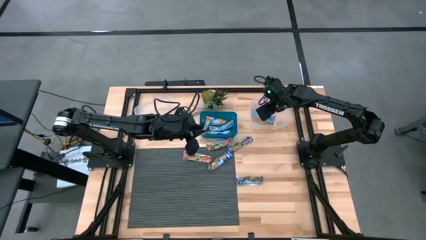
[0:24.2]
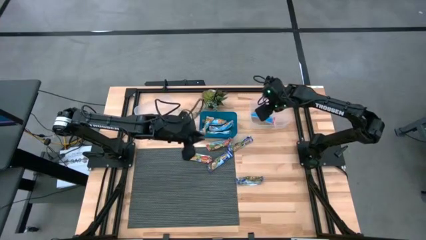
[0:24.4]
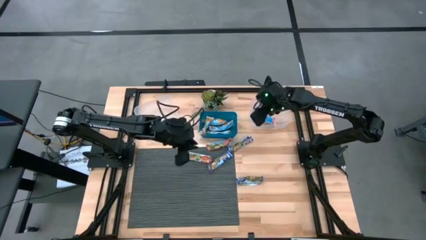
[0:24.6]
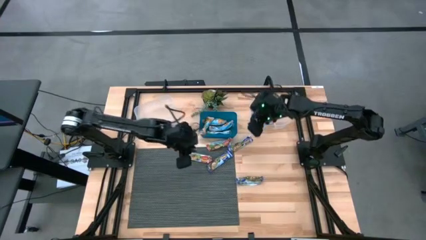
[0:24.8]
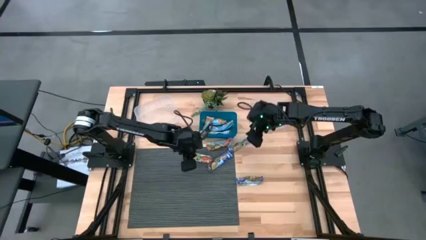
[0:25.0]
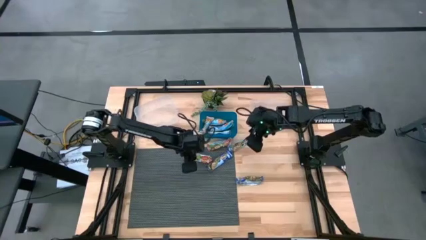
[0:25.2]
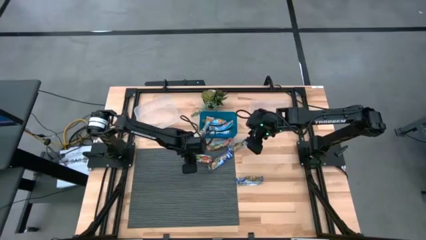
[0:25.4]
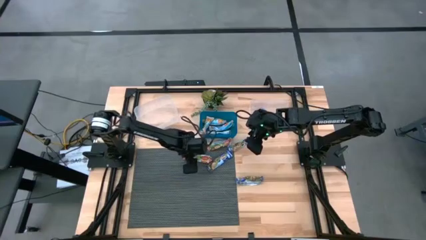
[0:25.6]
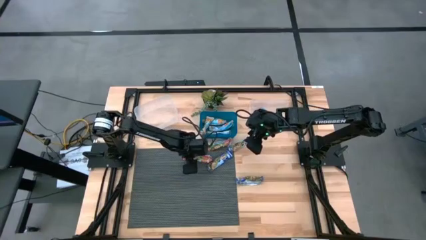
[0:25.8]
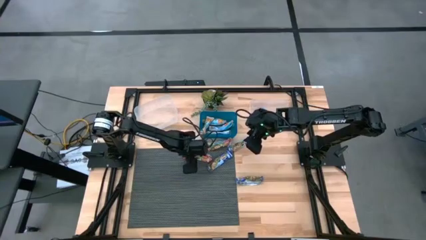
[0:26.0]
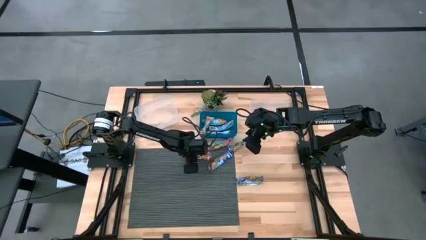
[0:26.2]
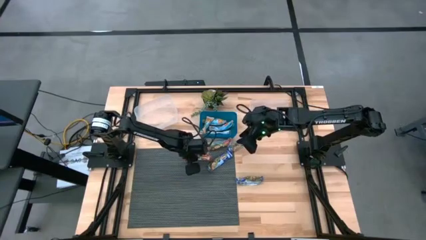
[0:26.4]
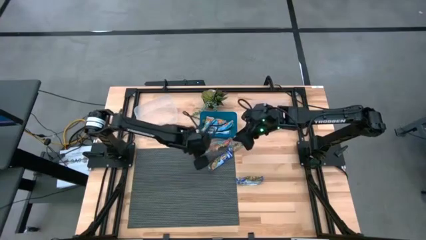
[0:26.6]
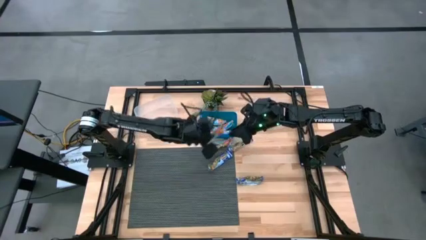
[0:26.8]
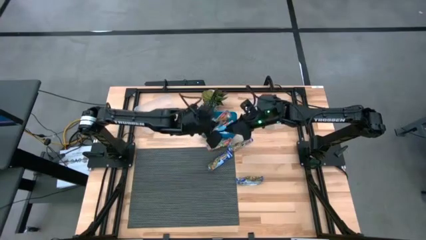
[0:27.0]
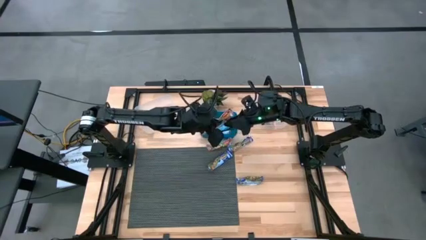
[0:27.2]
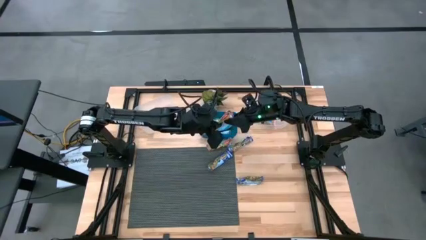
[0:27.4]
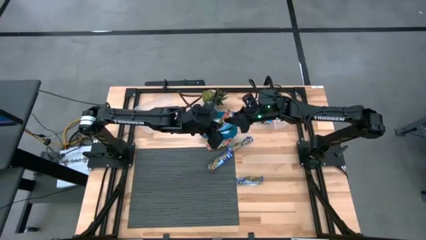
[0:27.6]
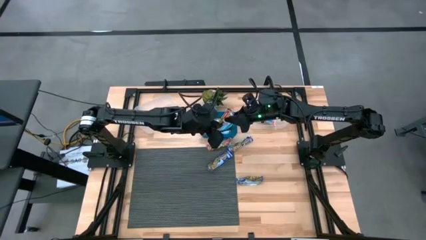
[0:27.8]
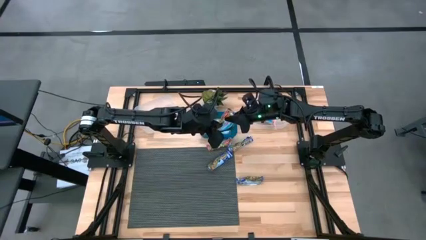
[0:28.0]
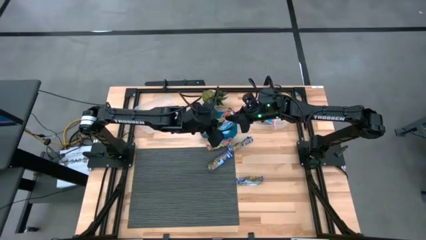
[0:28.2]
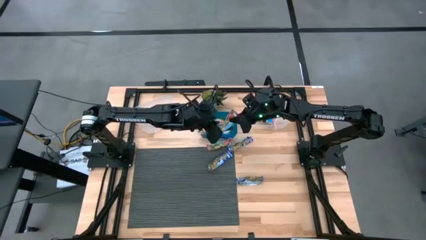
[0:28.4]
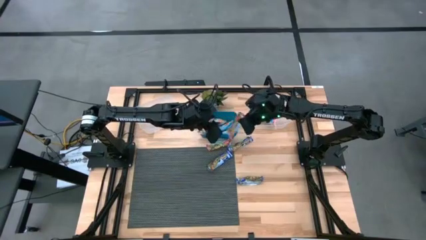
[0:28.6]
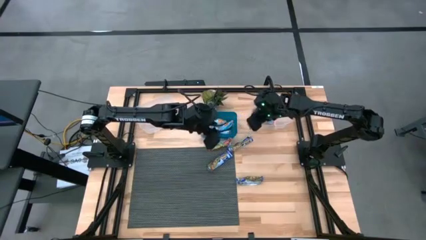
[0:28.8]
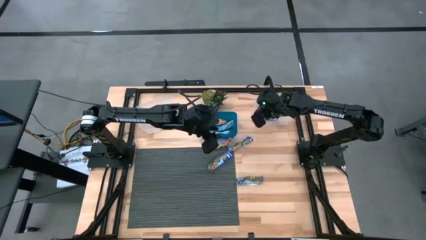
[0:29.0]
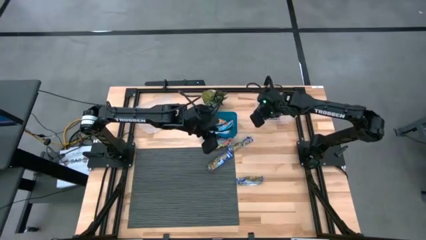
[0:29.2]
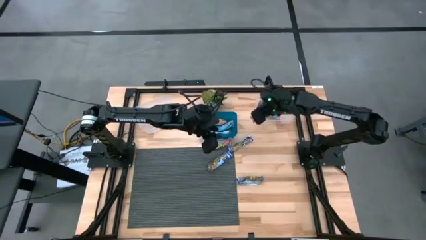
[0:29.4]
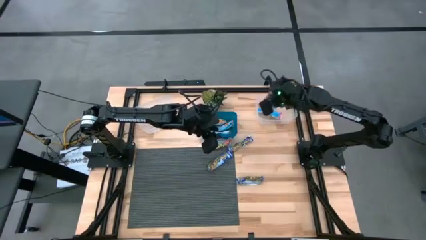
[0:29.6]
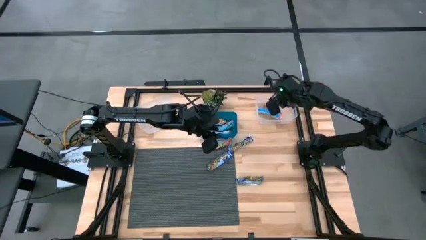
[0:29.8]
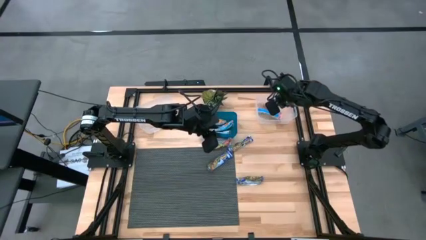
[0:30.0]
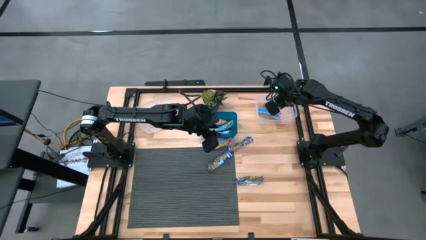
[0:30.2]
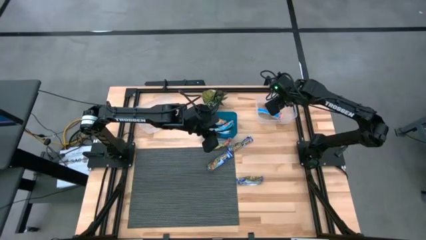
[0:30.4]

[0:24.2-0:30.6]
Task: Pick and place Granola Bars by type
Put the red granola bar into the right transparent bin

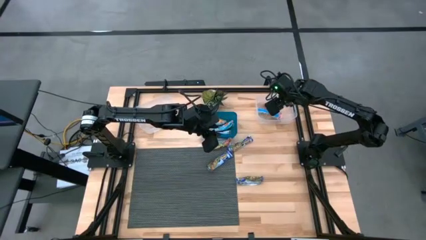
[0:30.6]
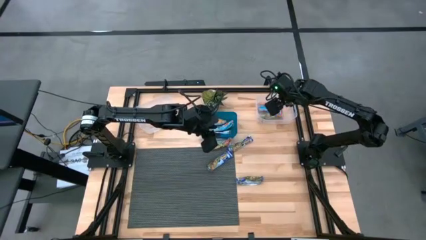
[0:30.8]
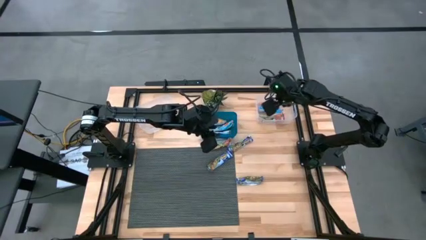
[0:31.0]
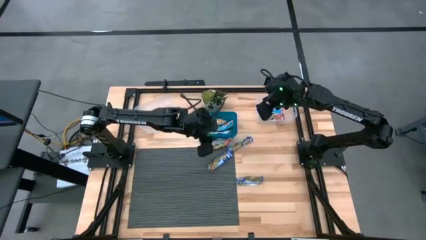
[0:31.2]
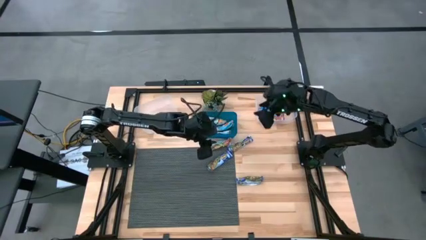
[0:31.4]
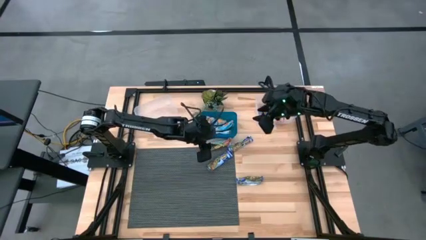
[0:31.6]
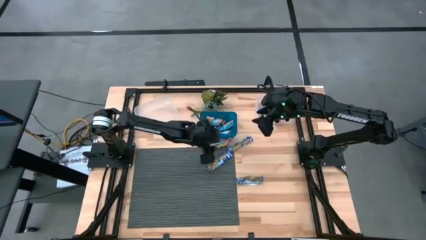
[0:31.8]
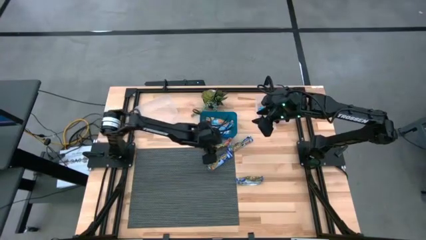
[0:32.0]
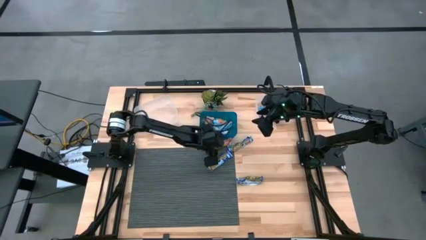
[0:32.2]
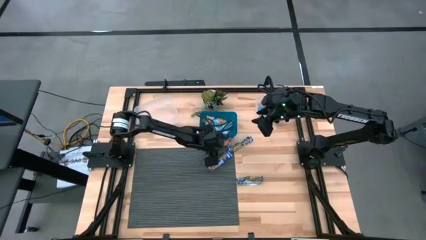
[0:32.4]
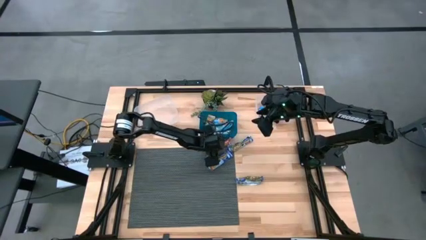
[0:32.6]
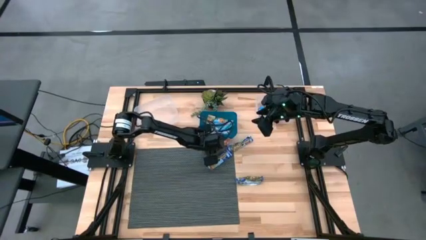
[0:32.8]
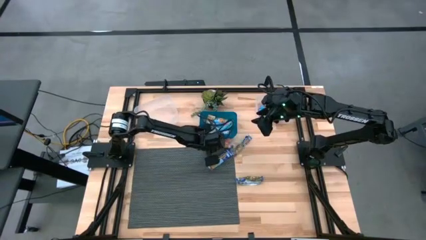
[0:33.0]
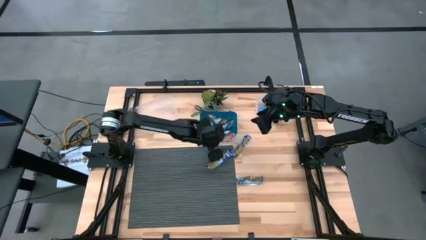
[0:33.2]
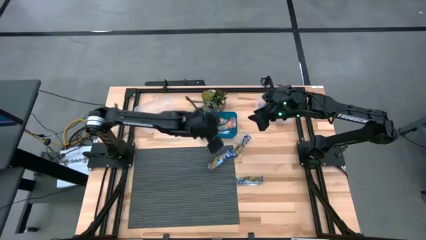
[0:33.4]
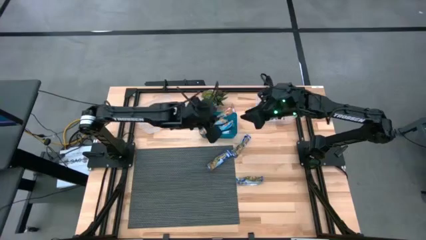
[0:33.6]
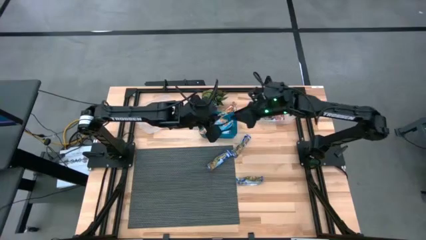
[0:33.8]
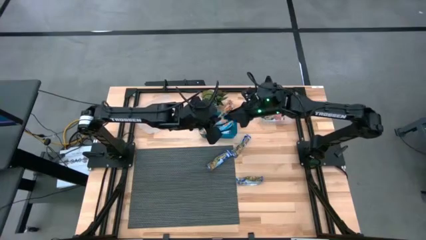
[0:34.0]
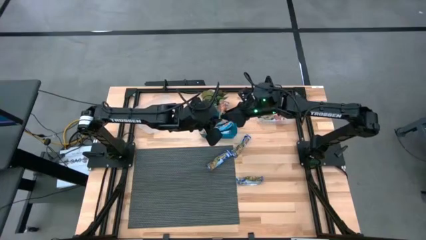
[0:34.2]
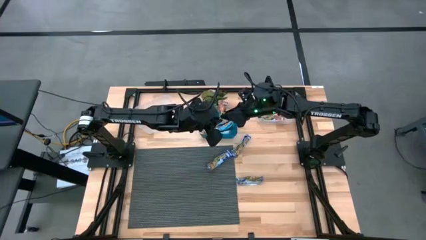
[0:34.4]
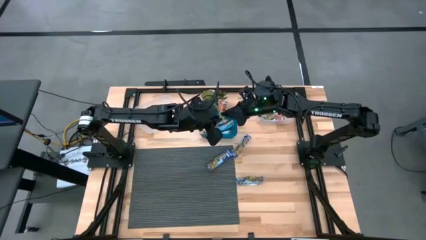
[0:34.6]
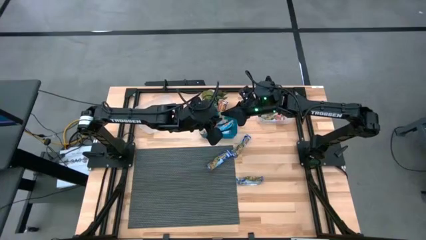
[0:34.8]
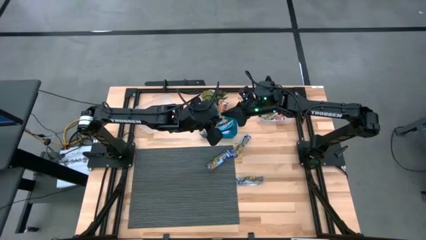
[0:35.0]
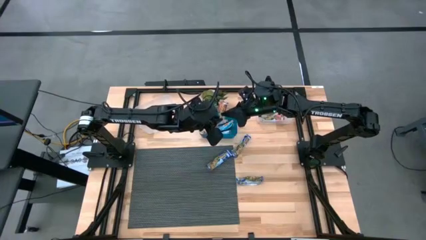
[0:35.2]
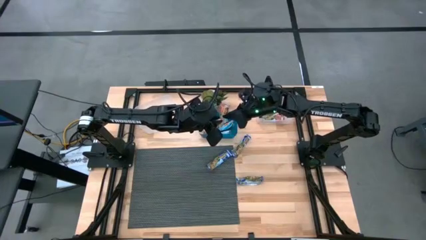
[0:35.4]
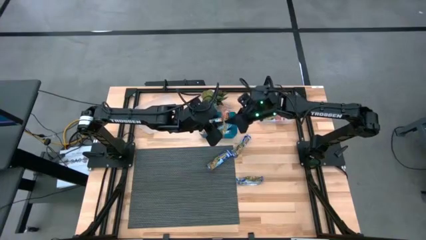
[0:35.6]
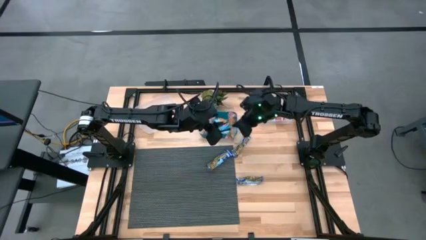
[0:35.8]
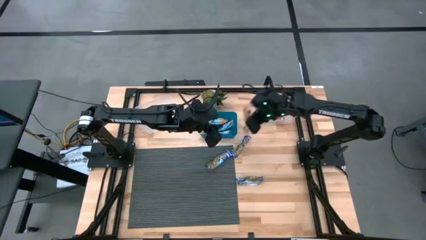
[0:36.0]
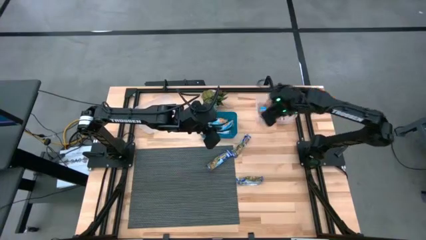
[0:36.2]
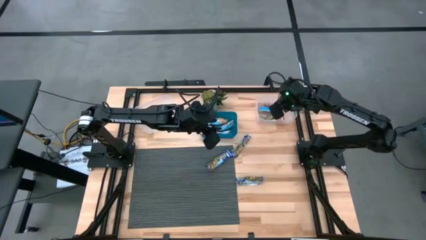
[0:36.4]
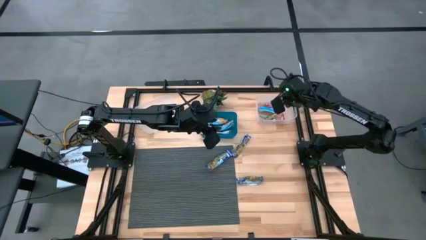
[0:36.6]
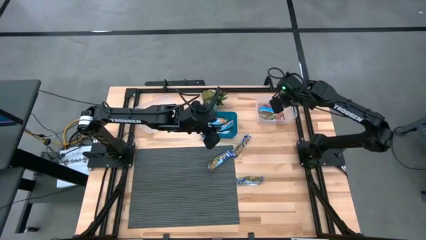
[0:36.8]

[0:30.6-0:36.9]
Put the red granola bar into the right transparent bin

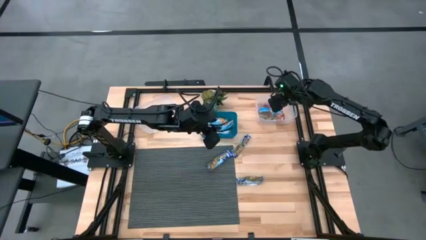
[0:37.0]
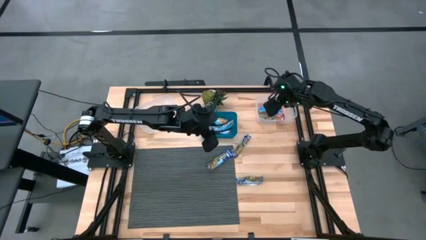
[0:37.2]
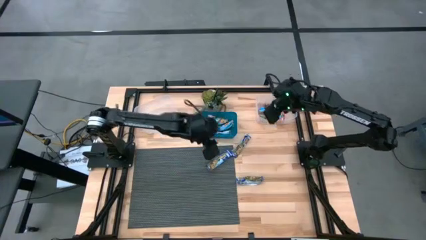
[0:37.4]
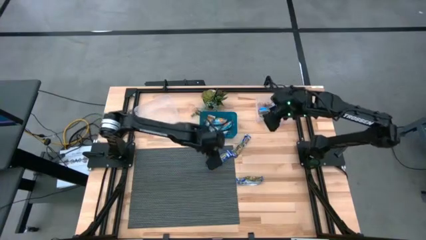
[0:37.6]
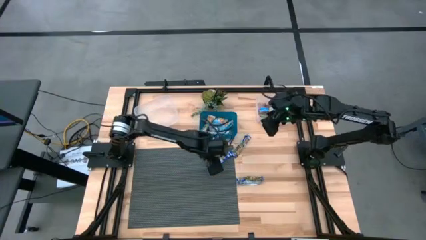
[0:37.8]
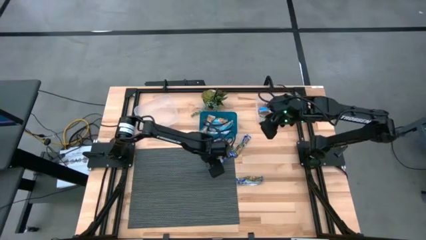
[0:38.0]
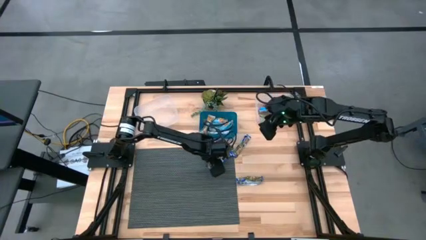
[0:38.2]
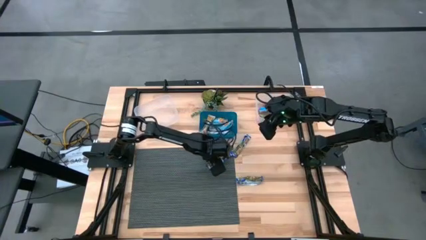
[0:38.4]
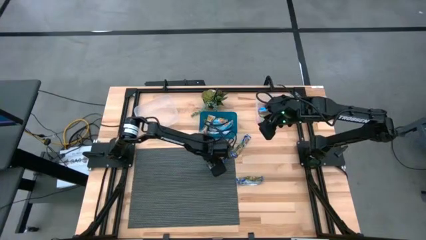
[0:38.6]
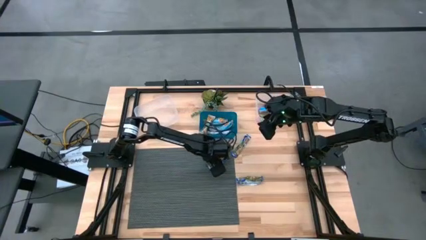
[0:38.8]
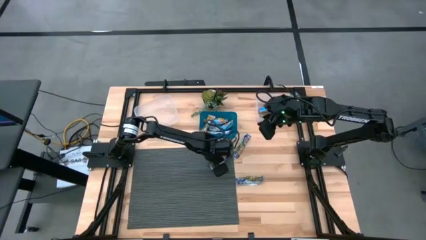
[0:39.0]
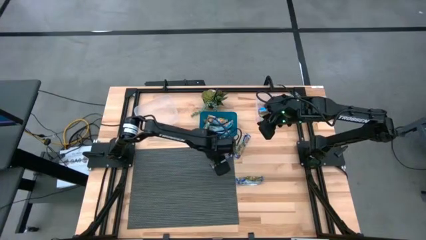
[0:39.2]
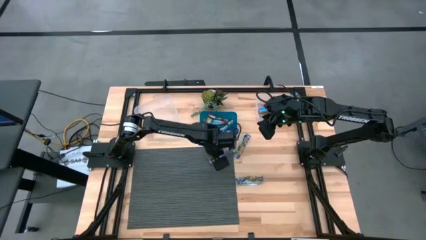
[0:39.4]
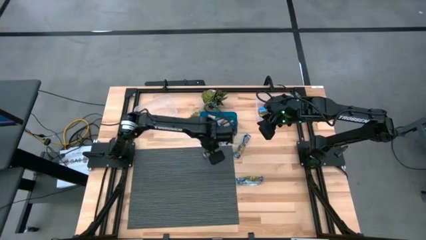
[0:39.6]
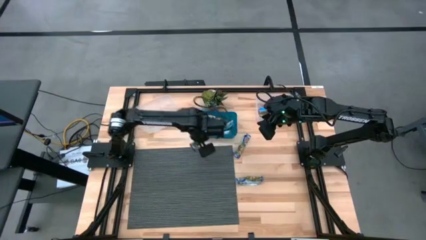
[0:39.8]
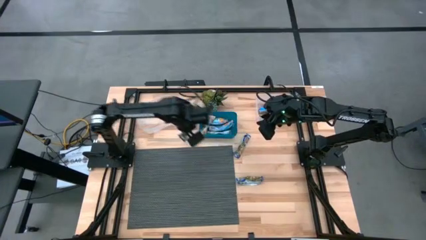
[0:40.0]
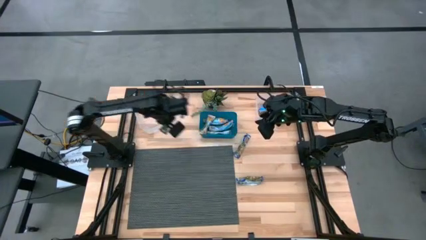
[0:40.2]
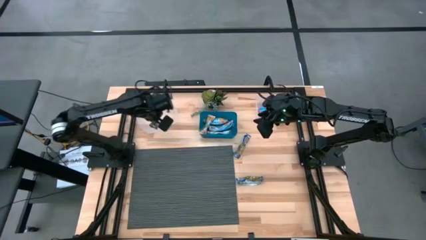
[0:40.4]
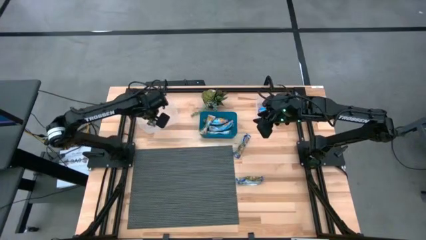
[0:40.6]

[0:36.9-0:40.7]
Put the blue granola bar into the left transparent bin
